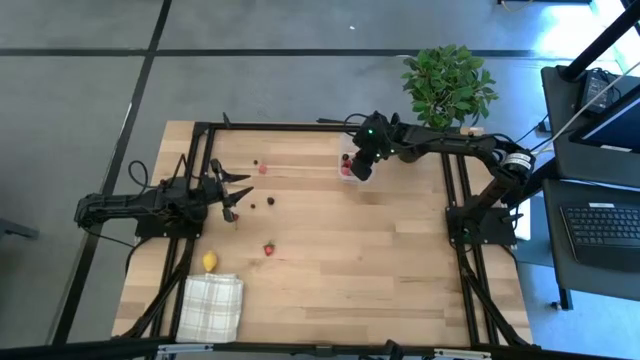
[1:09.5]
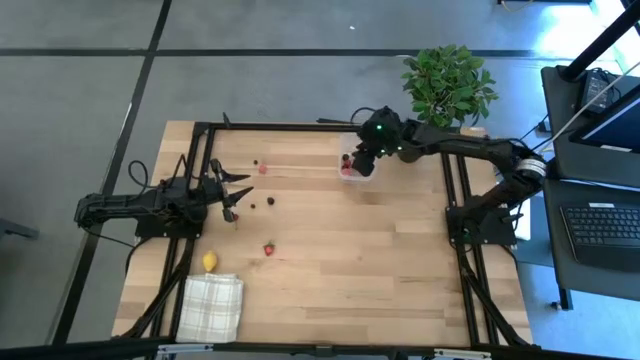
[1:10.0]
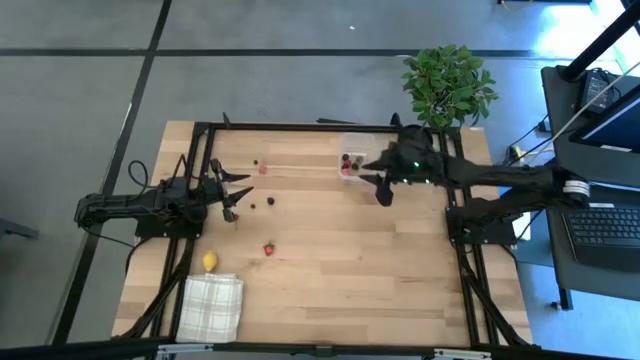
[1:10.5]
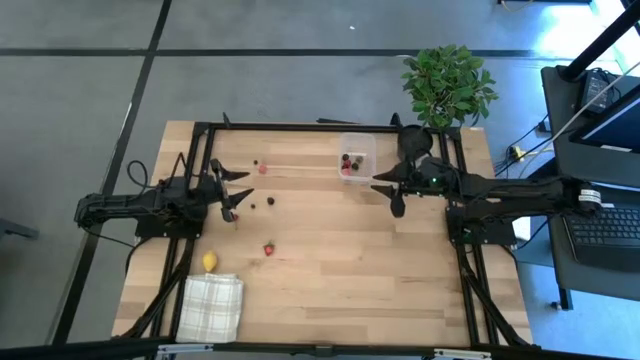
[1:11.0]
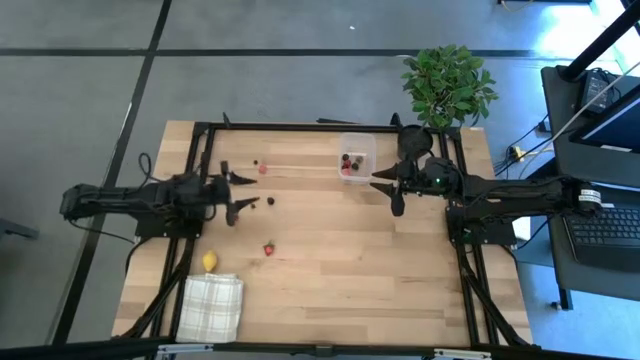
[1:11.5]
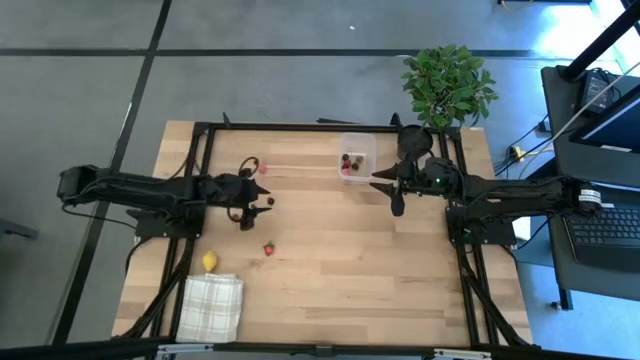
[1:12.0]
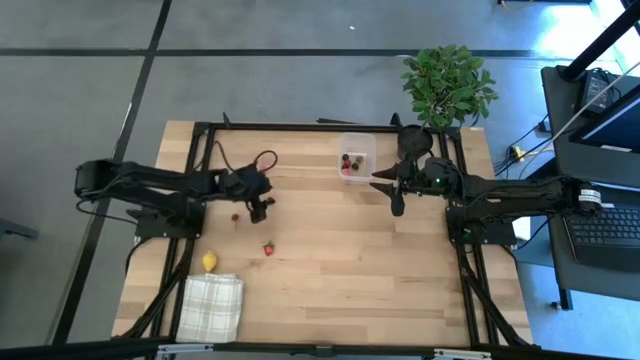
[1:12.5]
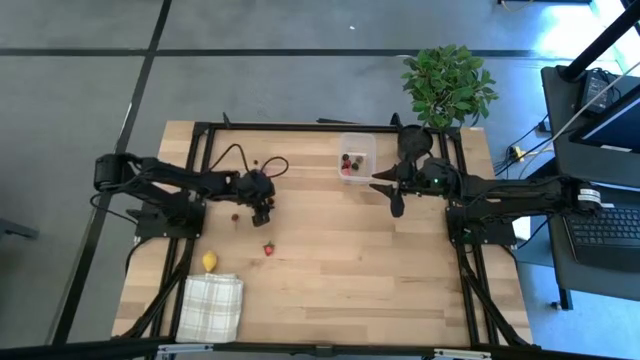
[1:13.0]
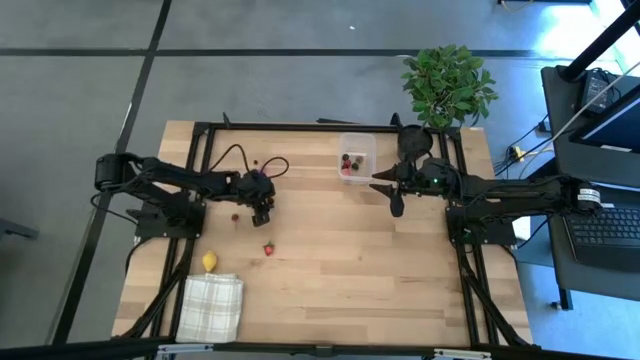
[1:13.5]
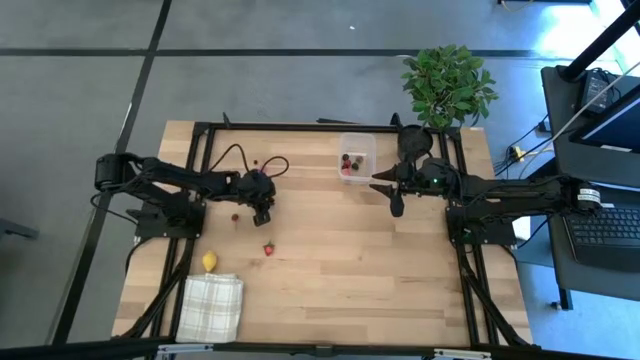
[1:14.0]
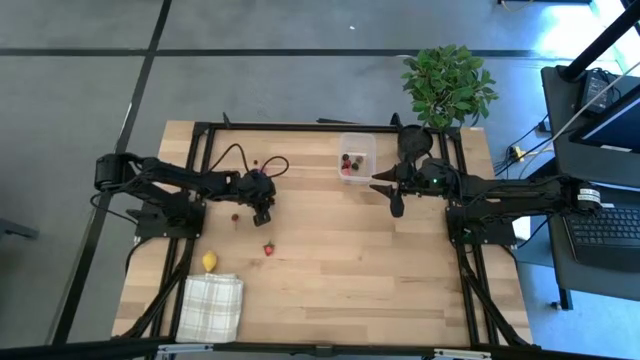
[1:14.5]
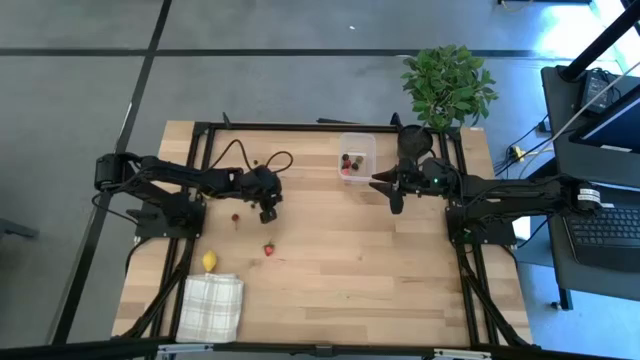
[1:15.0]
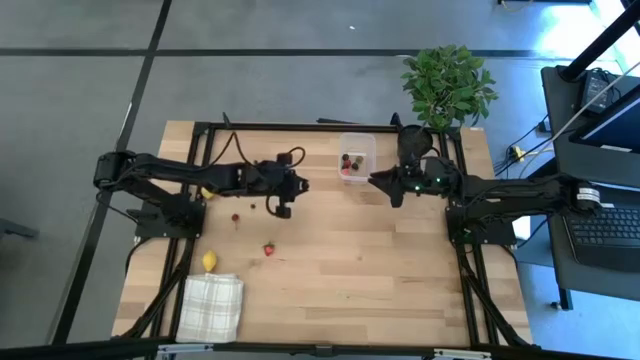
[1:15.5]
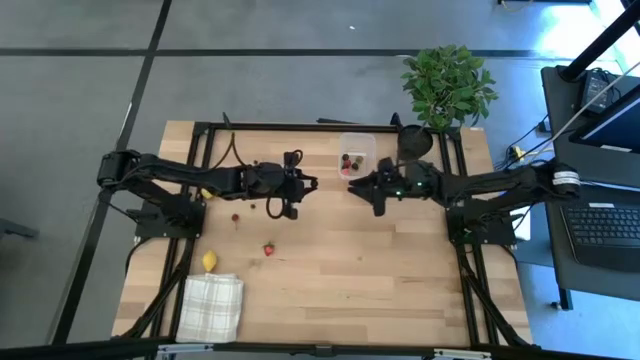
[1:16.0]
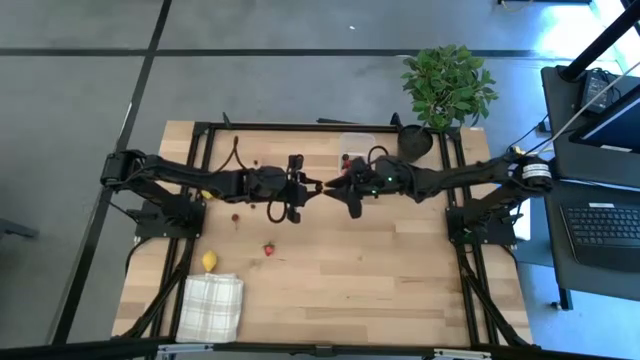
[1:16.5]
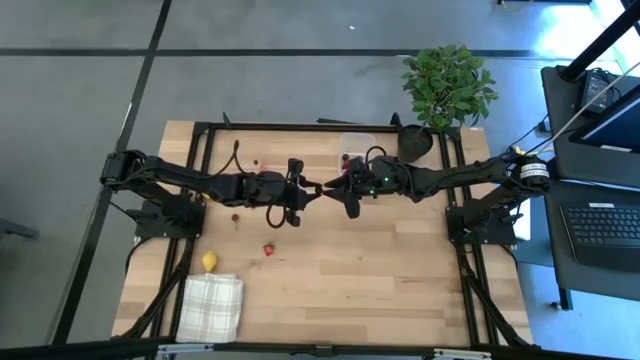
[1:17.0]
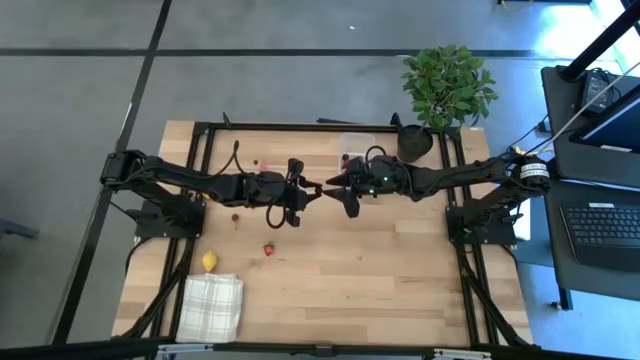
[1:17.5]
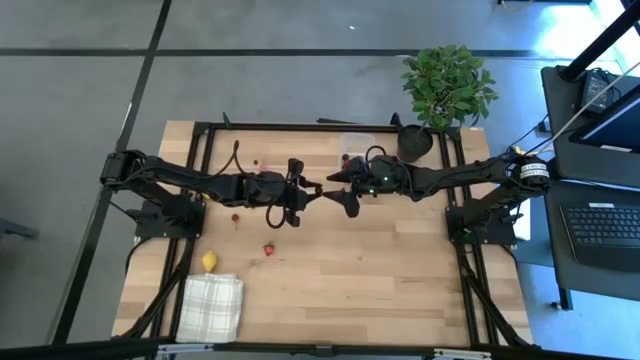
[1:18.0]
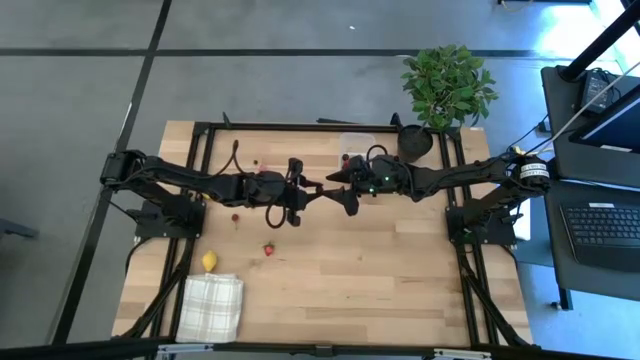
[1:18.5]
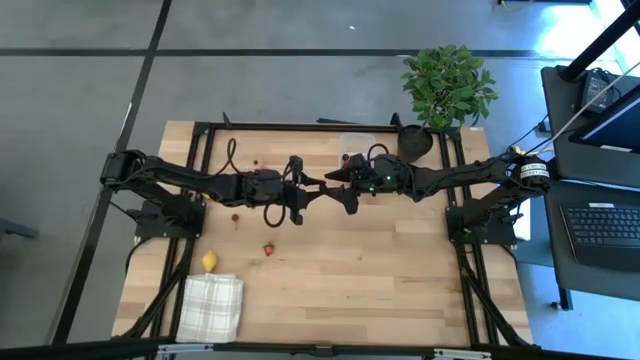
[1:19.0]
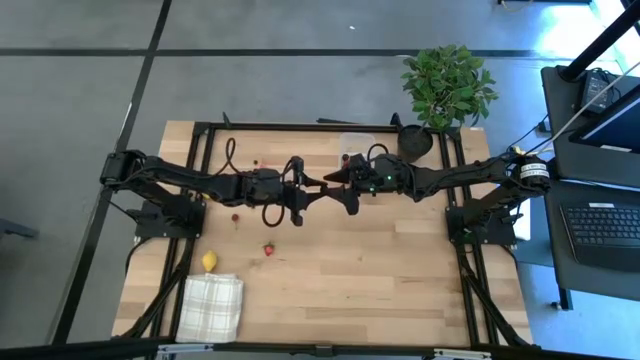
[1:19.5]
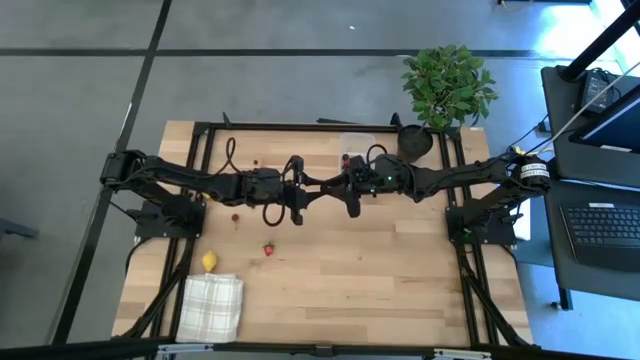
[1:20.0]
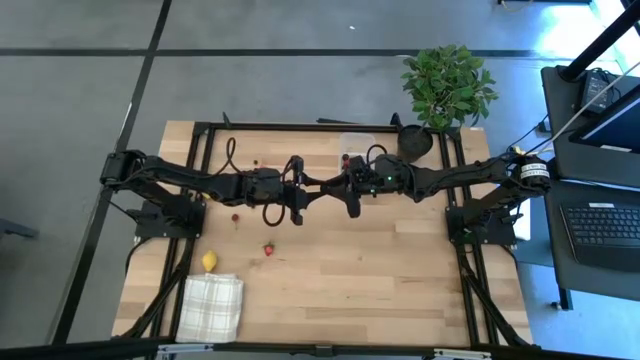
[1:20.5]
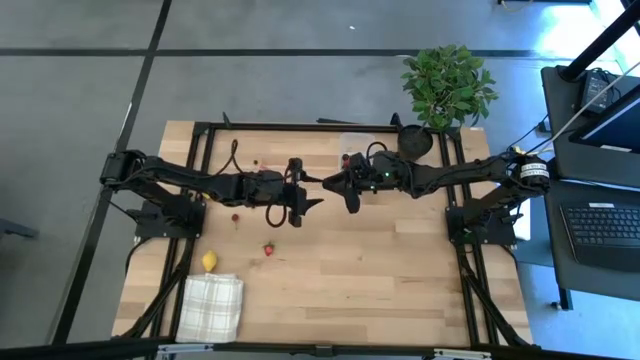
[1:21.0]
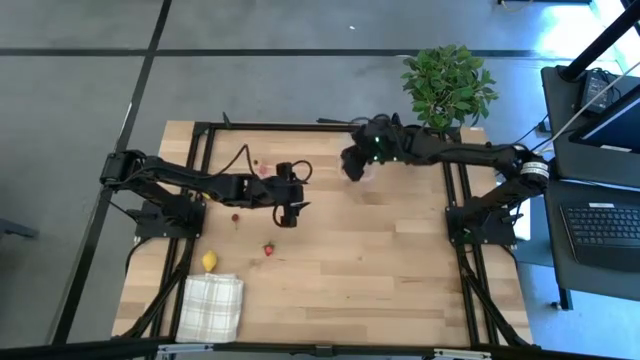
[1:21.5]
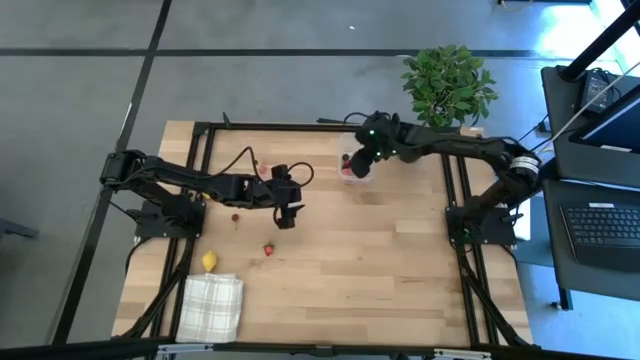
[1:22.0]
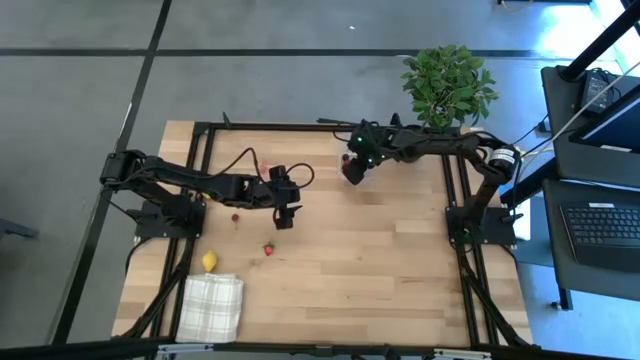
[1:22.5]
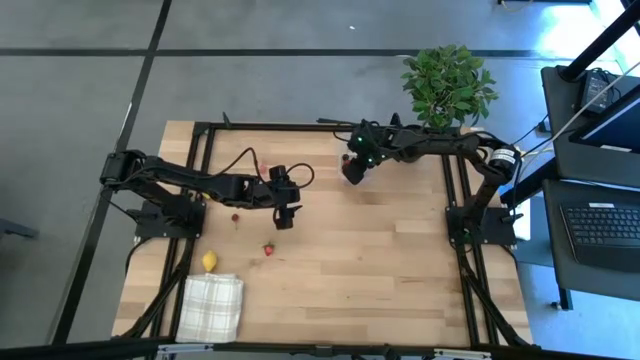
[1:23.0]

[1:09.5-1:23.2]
Task: Pick and placing Produce into tupperware
Put the blackberry into the transparent bin

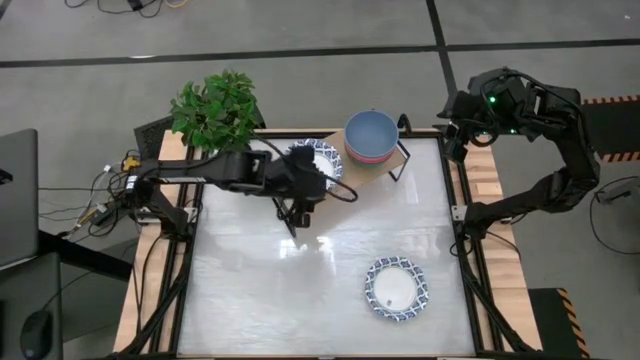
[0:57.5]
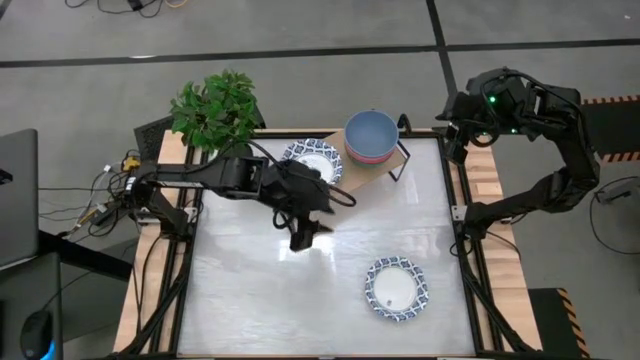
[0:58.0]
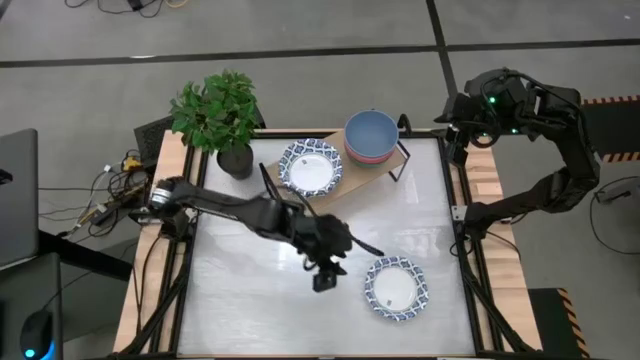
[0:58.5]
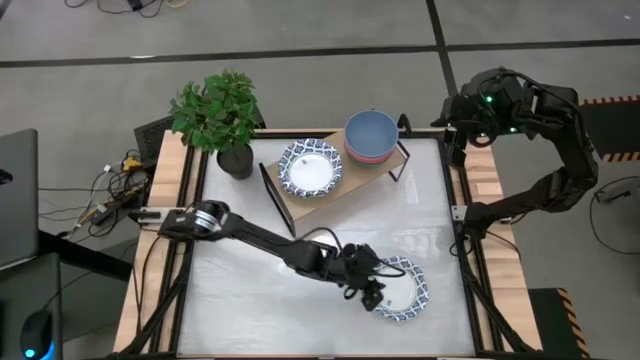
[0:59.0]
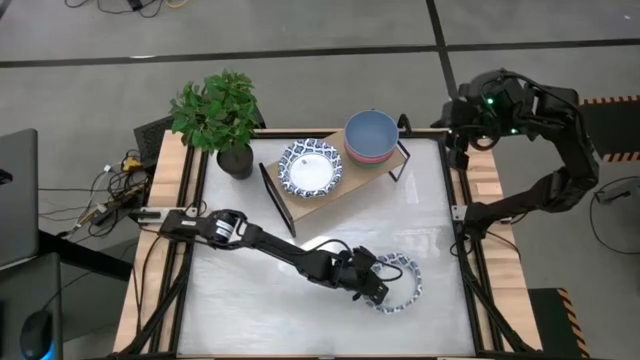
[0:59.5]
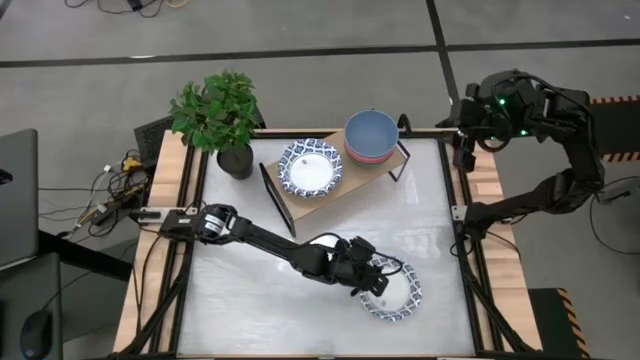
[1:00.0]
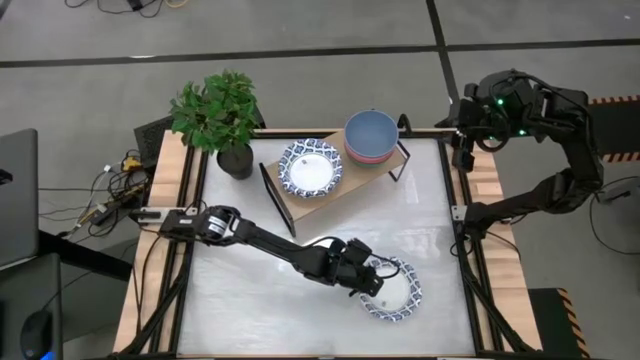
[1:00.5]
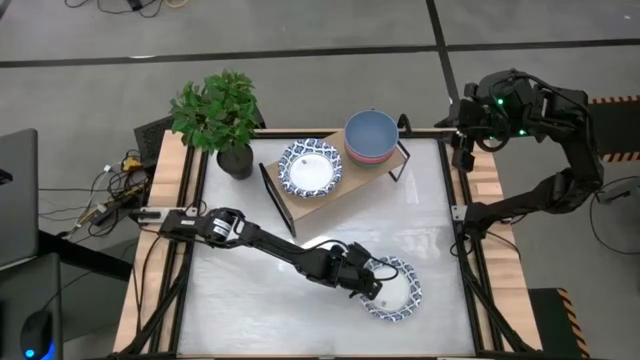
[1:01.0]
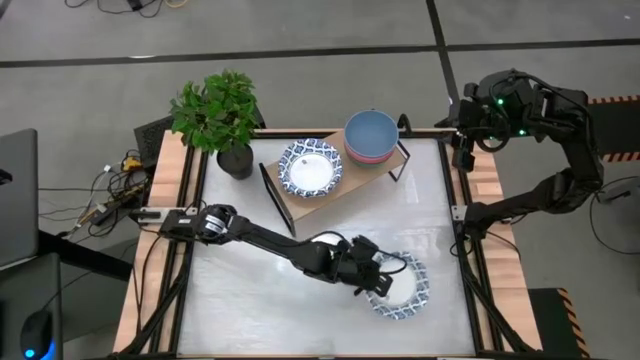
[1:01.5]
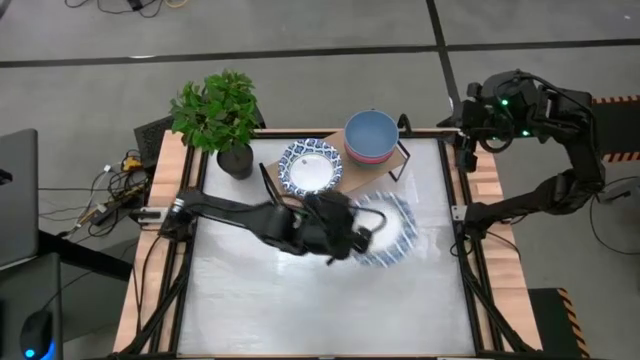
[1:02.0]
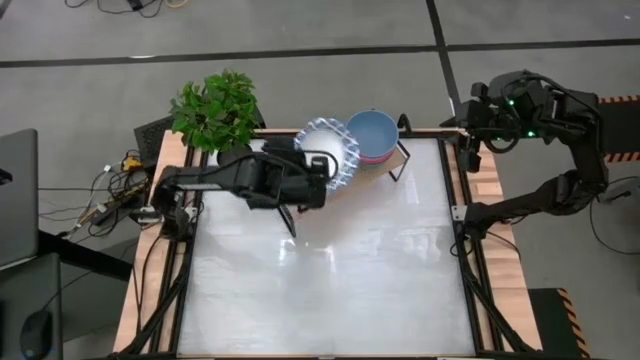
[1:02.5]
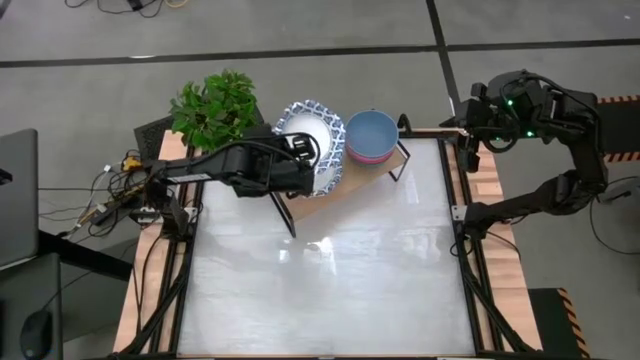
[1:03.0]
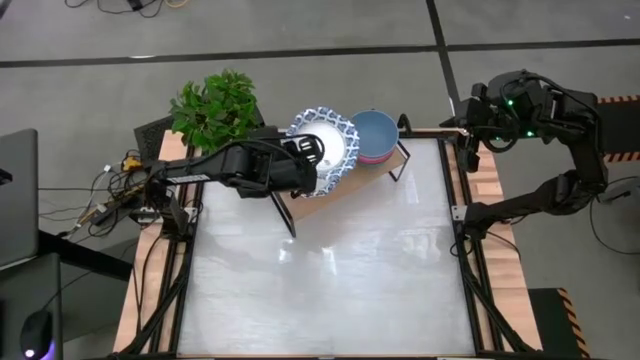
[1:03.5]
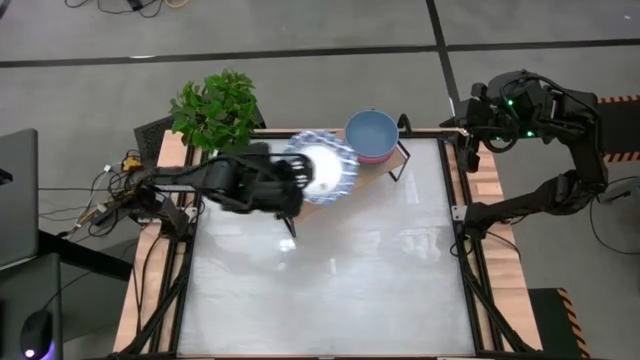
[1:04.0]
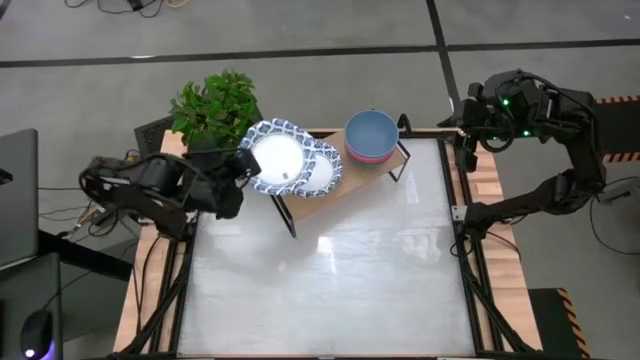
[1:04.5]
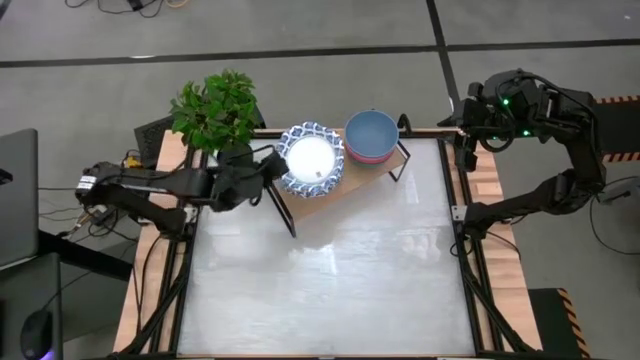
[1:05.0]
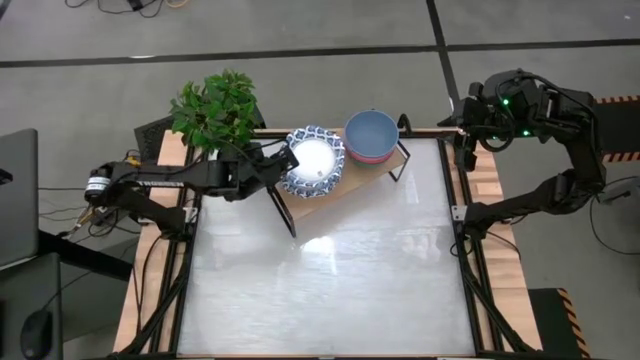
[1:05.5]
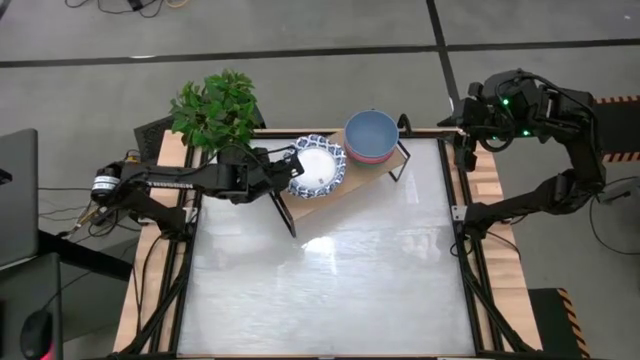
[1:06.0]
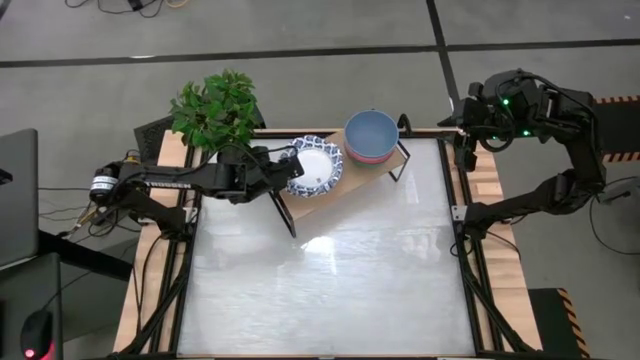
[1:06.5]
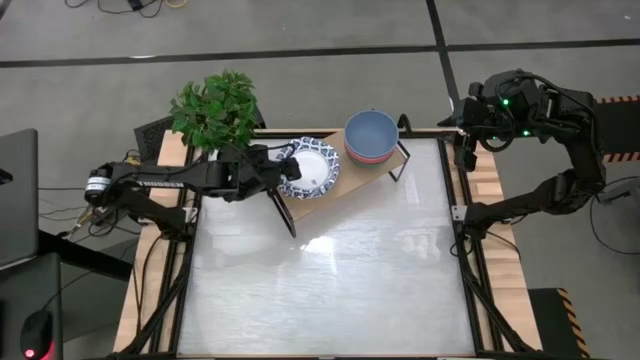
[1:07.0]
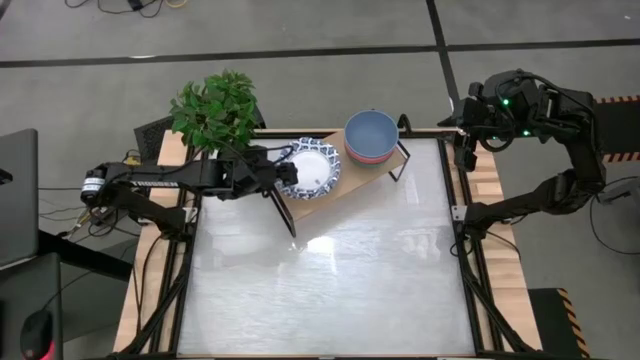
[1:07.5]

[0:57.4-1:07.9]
Task: Place and stack bowls onto a shelf
Stack the white and blue patterned bowl on the white and blue patterned bowl on the shelf
